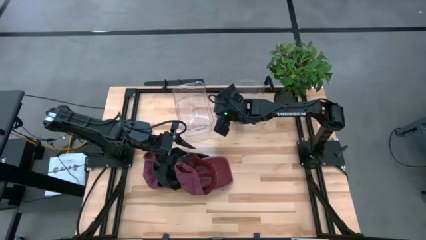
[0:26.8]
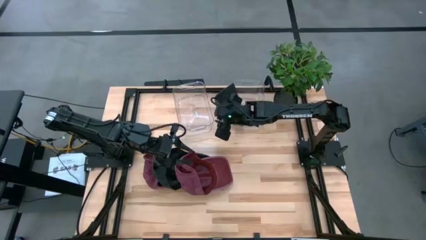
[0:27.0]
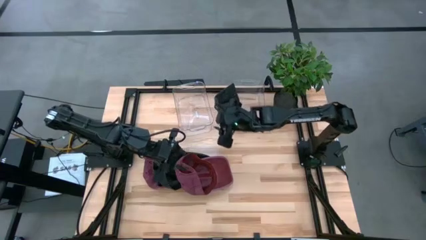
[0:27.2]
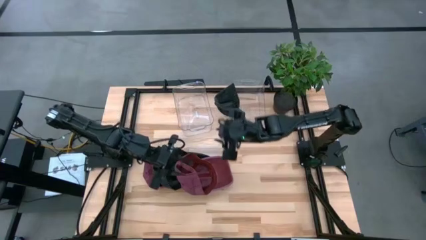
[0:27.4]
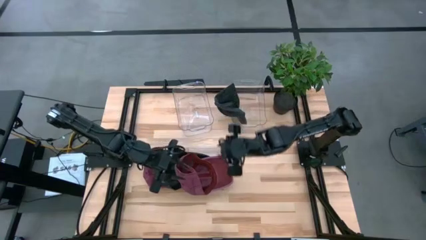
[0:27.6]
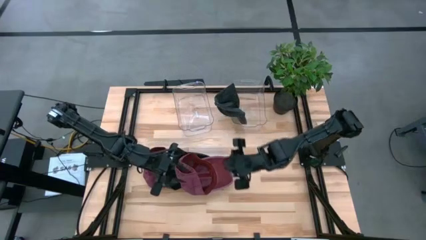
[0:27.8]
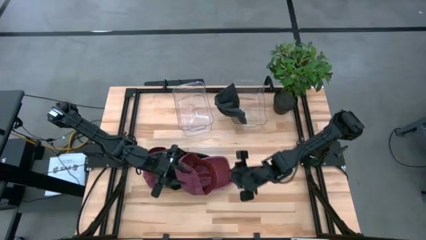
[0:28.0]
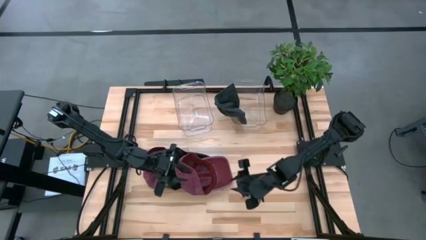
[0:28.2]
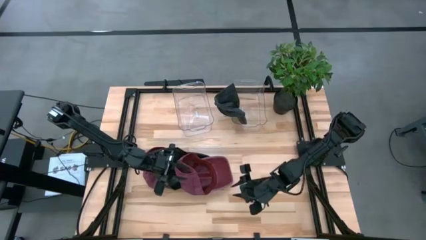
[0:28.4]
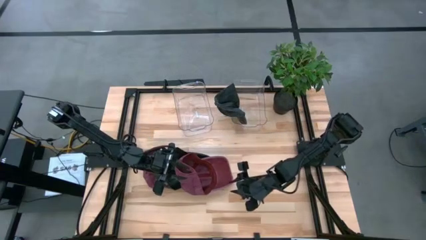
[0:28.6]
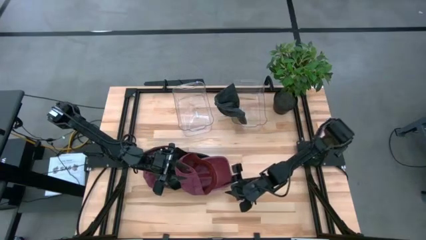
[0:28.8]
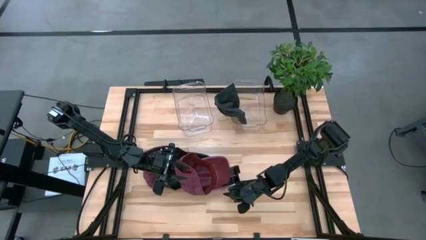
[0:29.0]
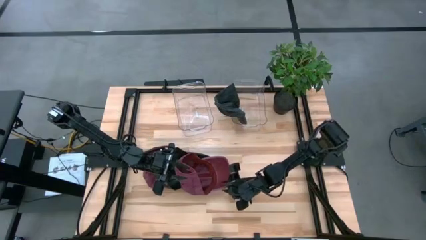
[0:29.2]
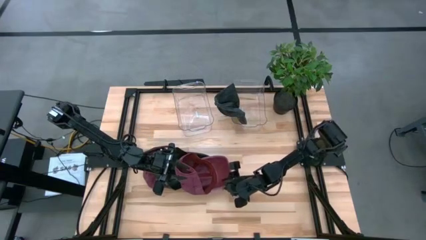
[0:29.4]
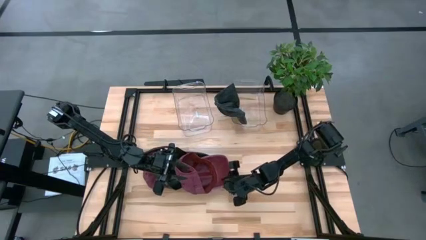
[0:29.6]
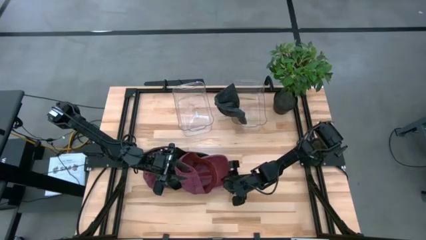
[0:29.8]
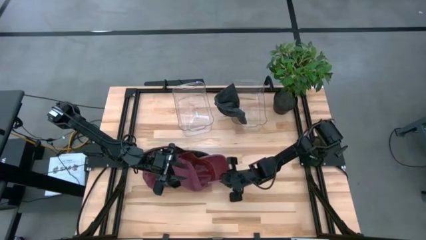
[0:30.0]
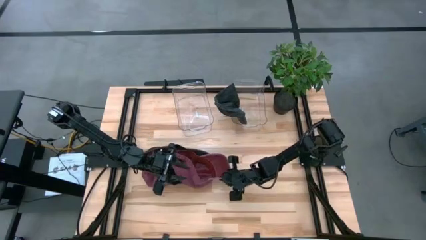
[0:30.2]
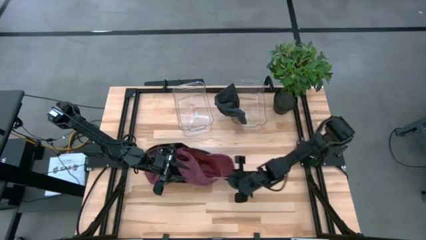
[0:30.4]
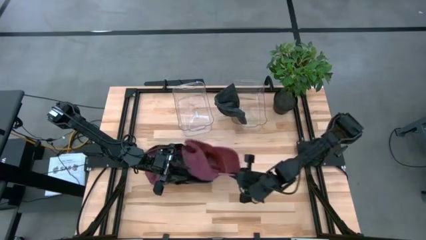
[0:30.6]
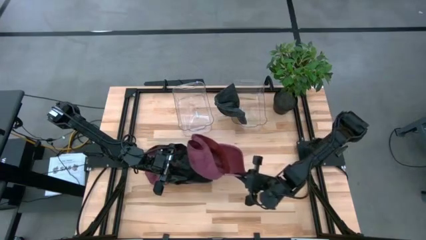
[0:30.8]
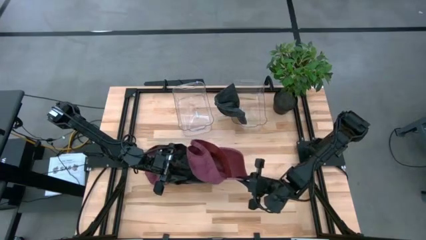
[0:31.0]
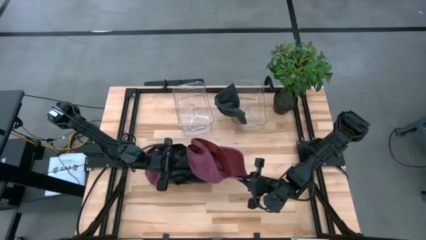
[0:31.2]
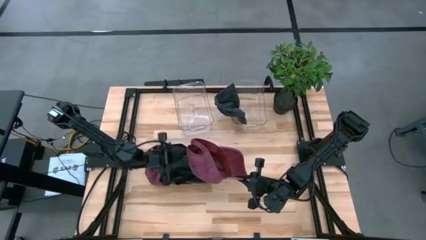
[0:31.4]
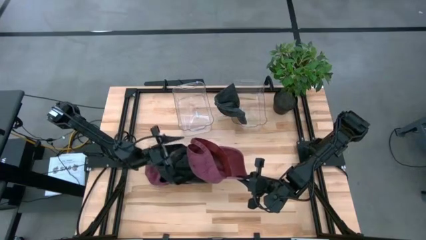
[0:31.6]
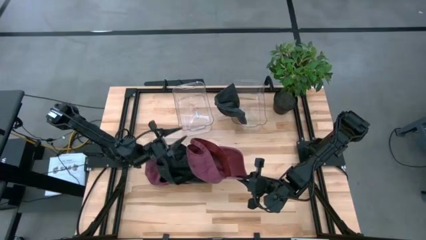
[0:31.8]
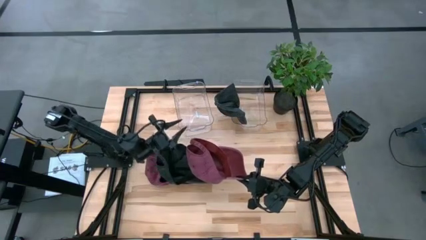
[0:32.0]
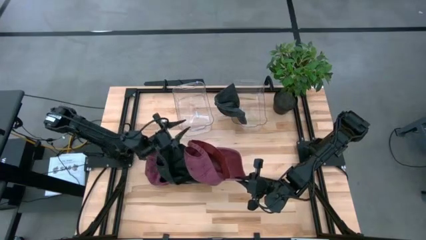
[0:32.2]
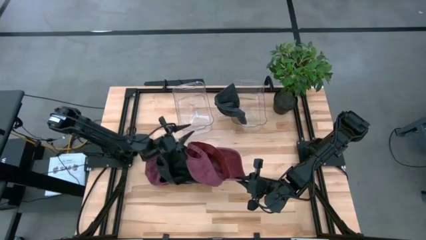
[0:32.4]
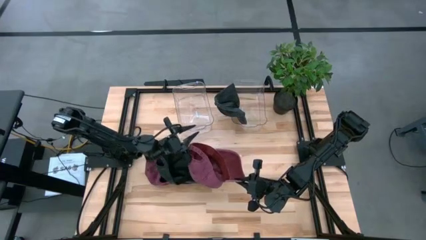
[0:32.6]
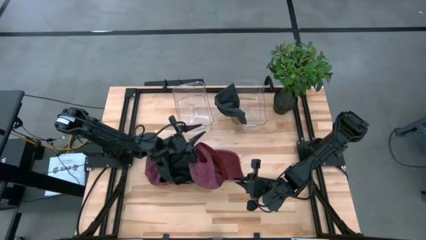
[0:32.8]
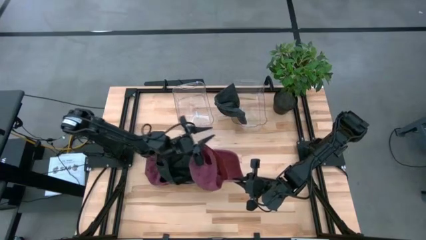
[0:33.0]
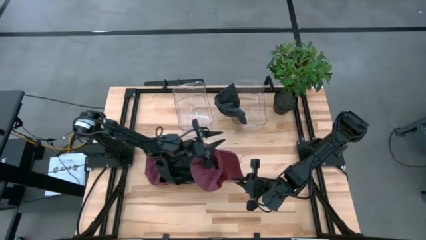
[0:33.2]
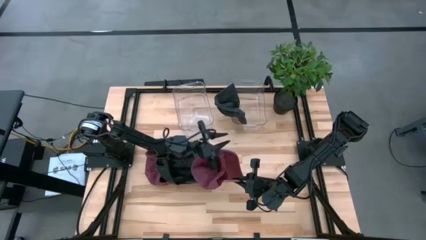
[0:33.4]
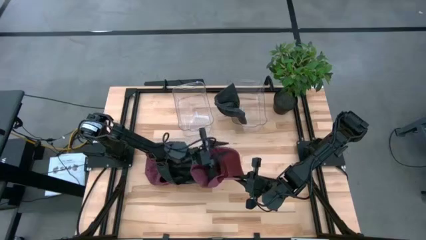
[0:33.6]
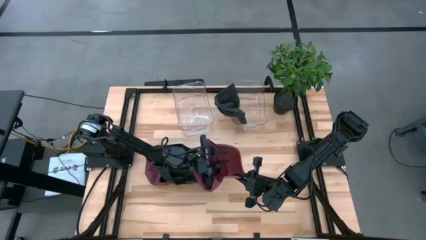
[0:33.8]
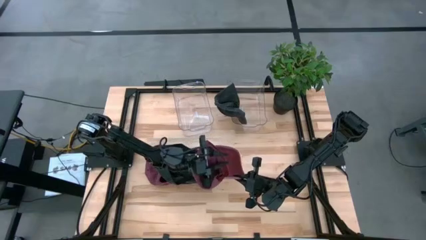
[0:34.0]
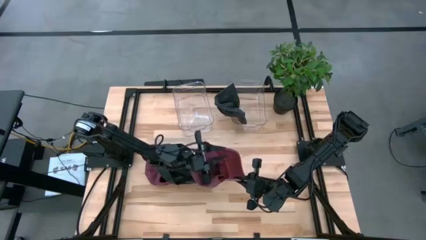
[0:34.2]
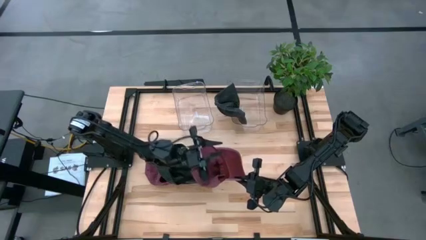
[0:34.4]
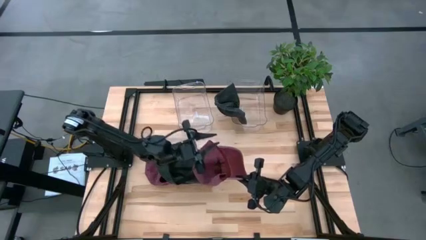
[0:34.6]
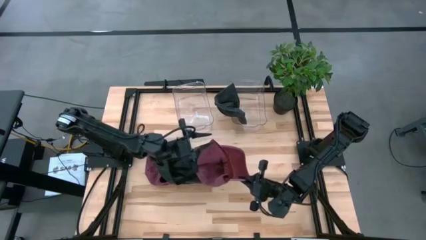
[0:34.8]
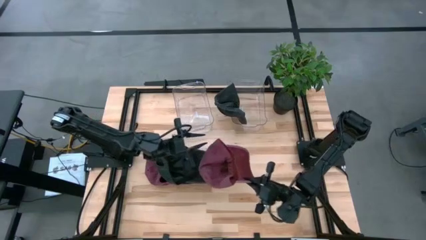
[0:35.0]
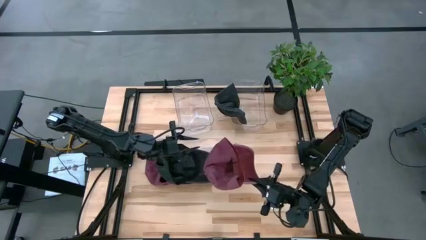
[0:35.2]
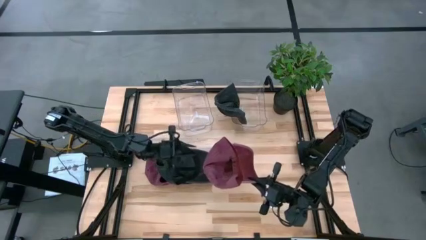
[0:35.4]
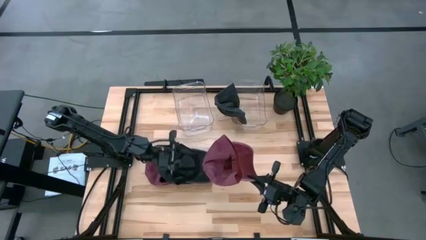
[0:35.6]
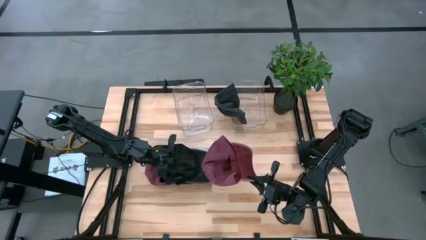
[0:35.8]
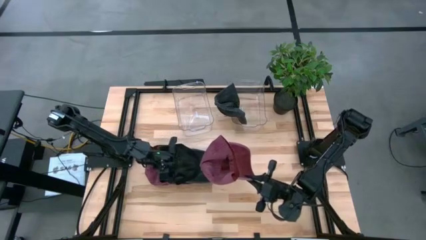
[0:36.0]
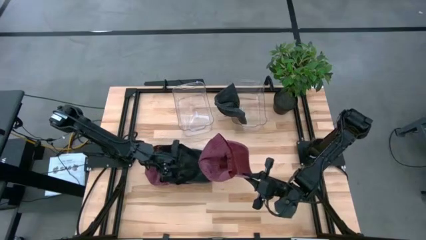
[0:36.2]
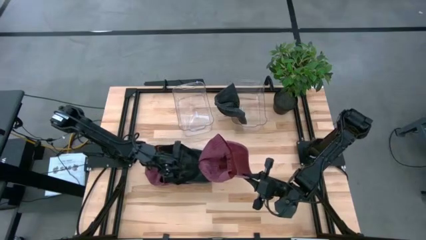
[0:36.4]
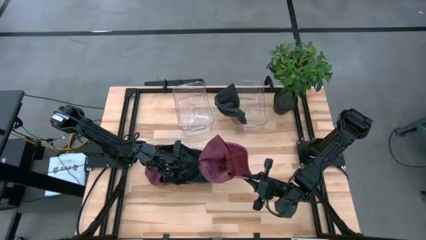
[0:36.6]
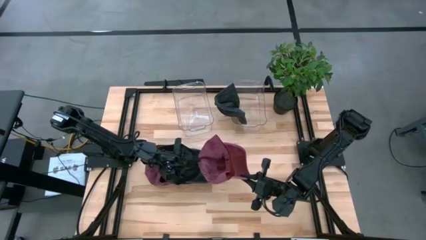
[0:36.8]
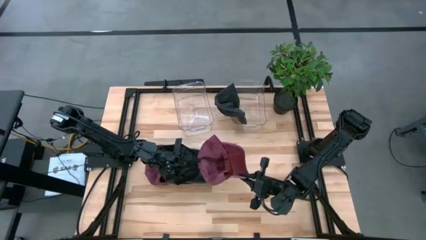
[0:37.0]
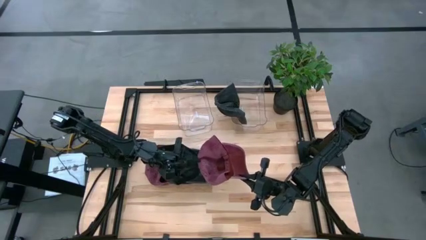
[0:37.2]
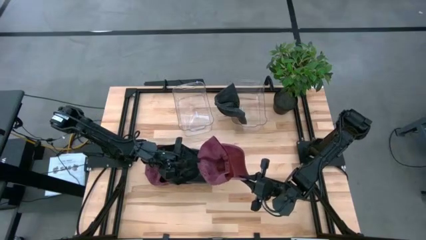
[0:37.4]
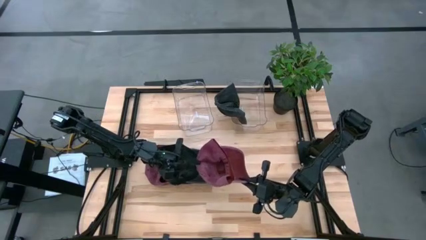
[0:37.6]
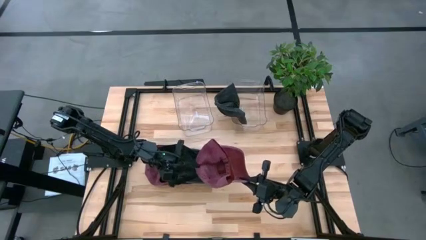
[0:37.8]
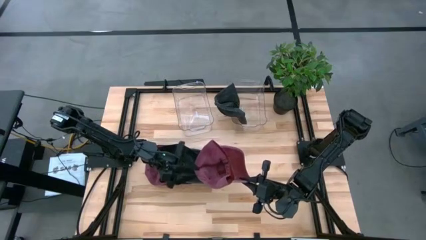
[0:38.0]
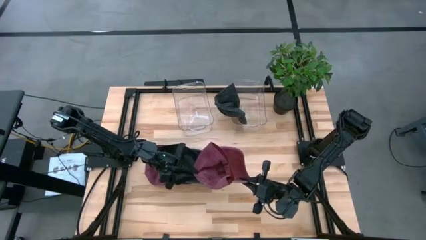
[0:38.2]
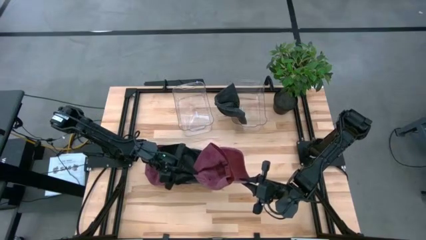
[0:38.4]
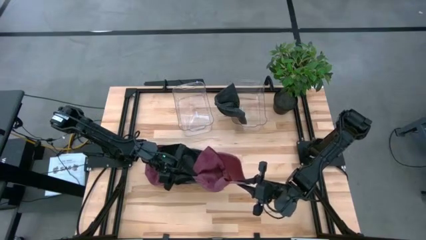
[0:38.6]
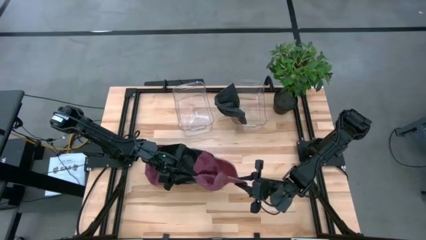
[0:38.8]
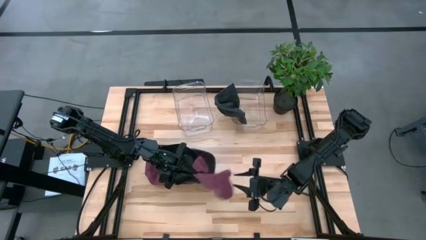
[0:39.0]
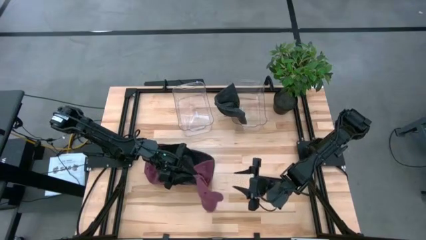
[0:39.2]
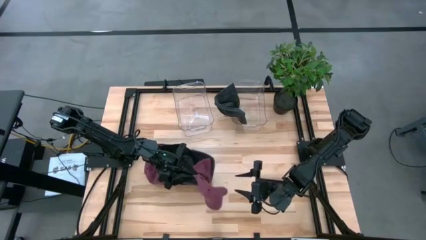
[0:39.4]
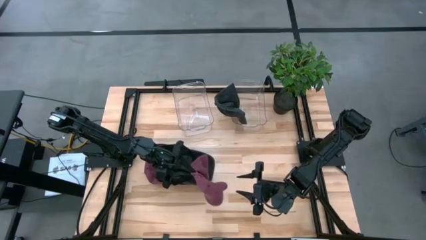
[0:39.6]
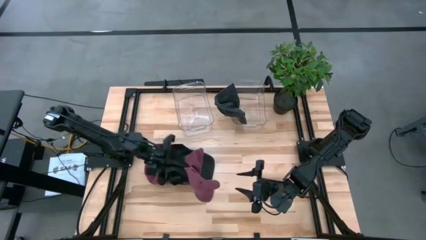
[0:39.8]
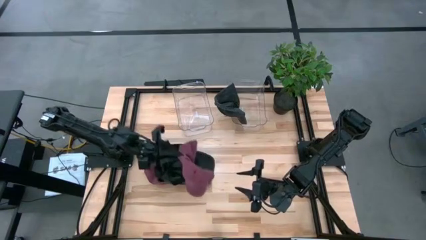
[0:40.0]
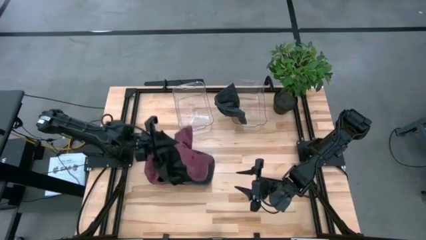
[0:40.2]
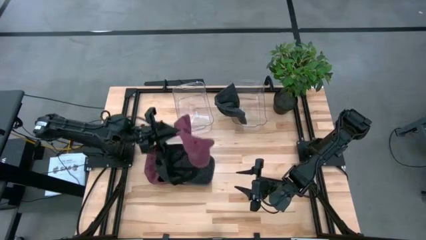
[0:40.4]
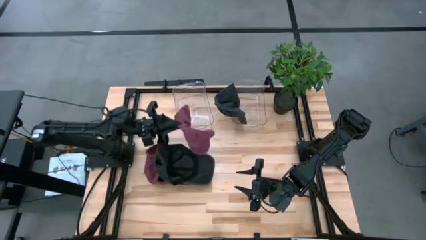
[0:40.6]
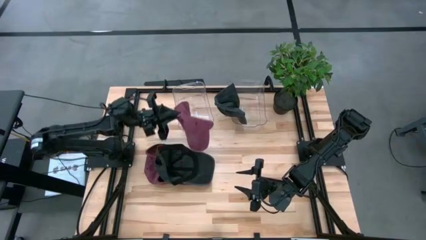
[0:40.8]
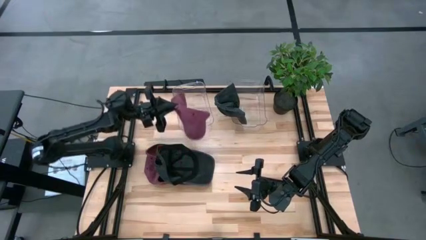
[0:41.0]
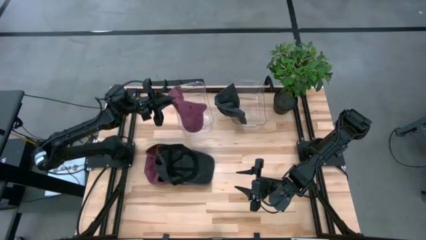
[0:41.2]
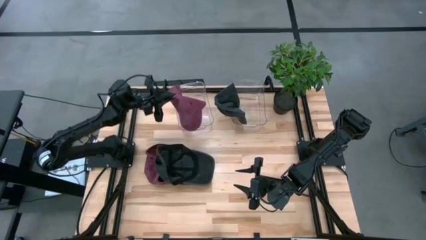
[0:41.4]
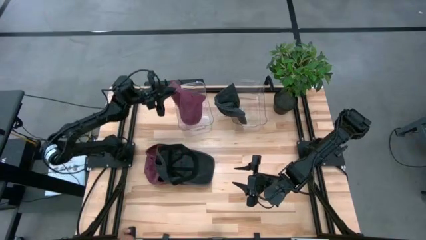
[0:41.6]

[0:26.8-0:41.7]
Task: Pick & Place hat
Put the right red cap in the left transparent bin
